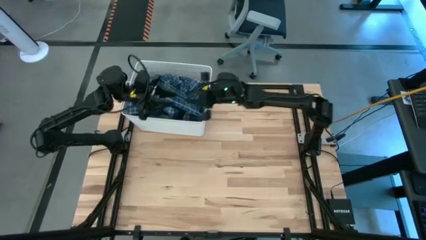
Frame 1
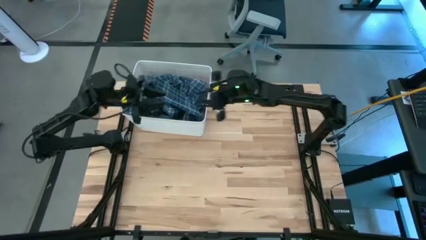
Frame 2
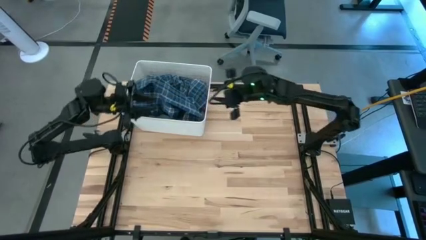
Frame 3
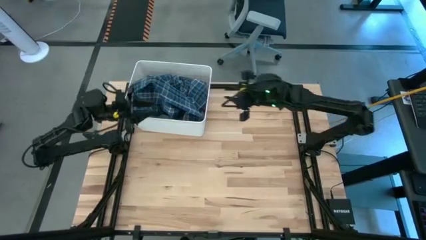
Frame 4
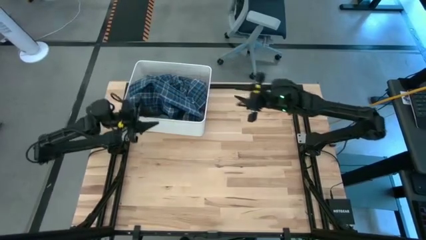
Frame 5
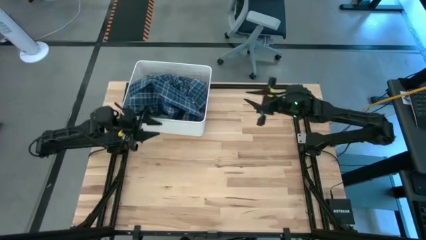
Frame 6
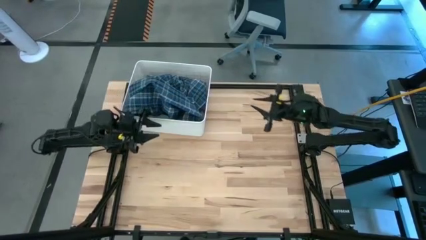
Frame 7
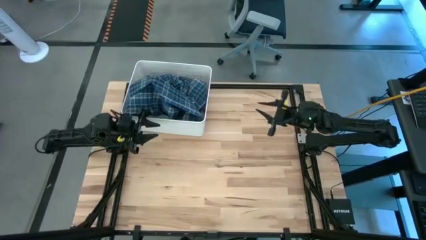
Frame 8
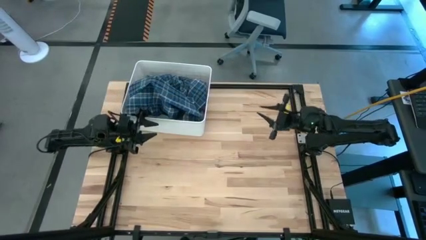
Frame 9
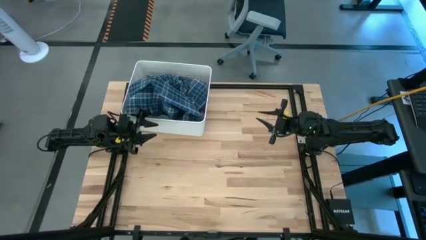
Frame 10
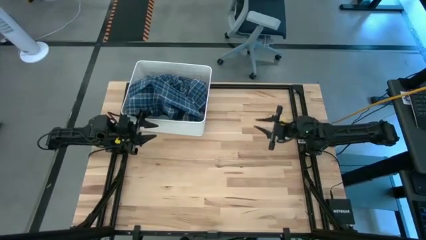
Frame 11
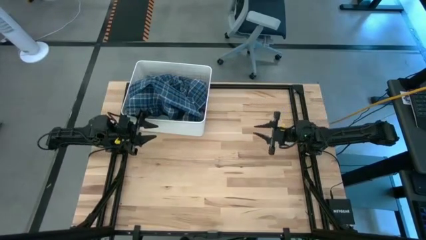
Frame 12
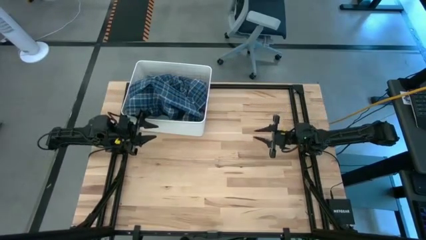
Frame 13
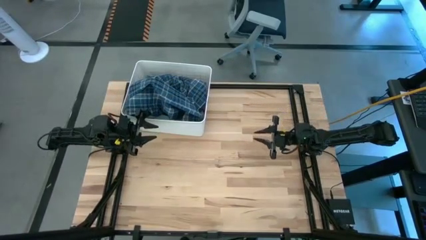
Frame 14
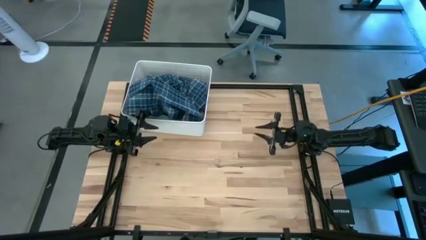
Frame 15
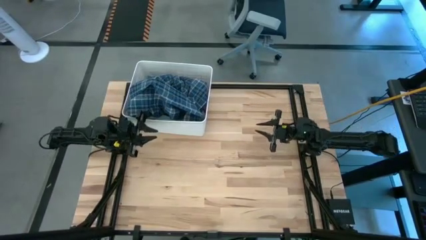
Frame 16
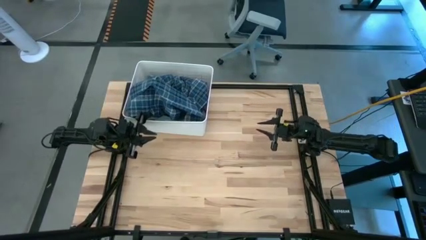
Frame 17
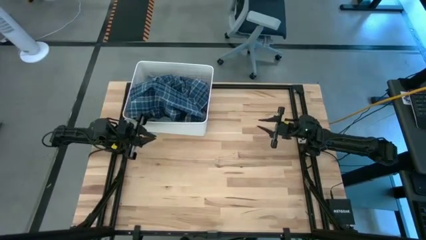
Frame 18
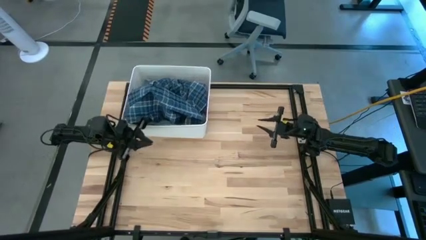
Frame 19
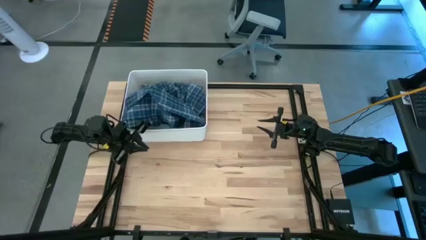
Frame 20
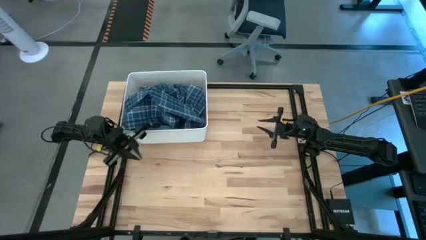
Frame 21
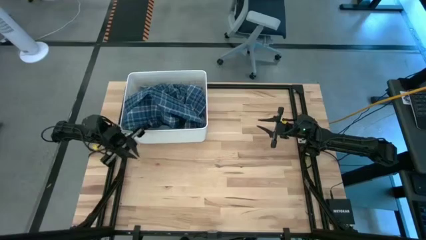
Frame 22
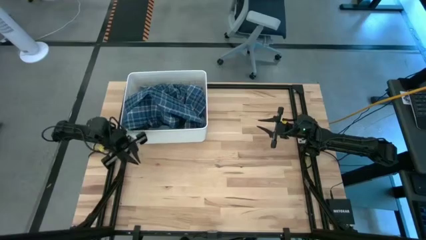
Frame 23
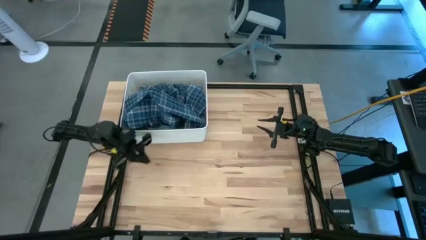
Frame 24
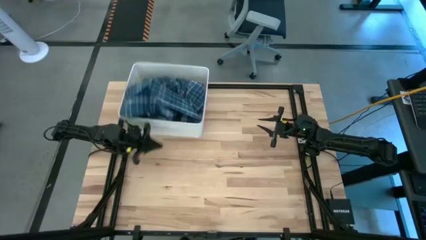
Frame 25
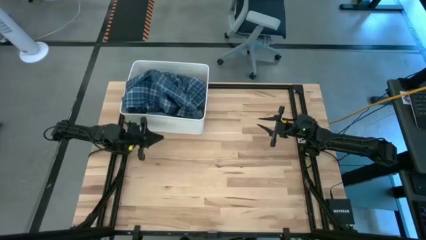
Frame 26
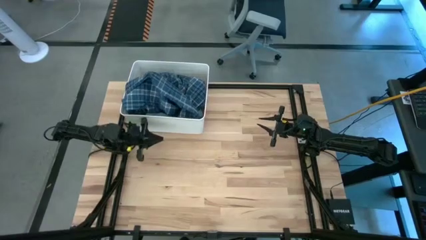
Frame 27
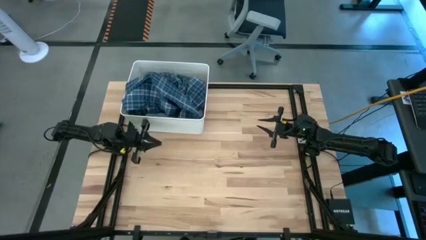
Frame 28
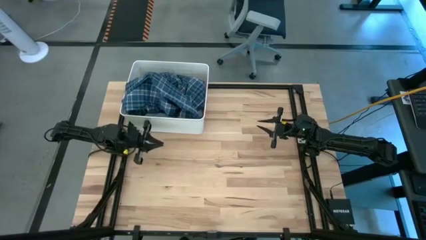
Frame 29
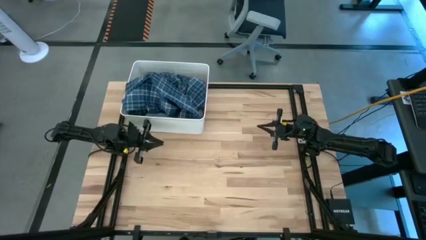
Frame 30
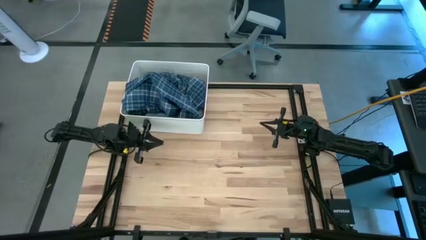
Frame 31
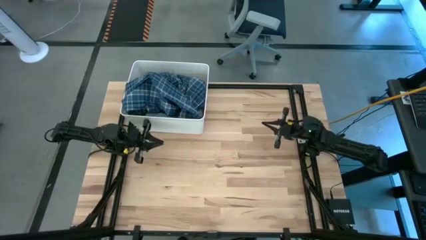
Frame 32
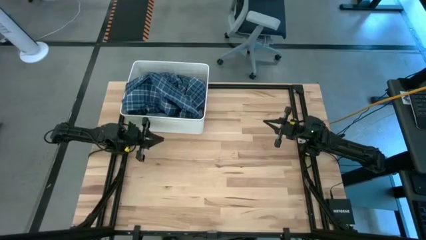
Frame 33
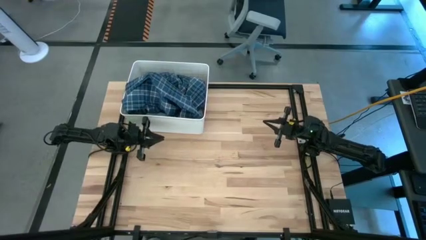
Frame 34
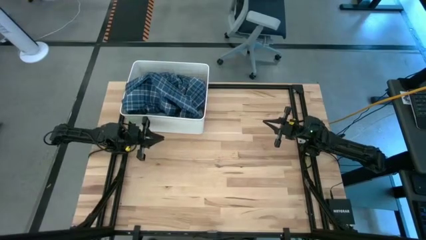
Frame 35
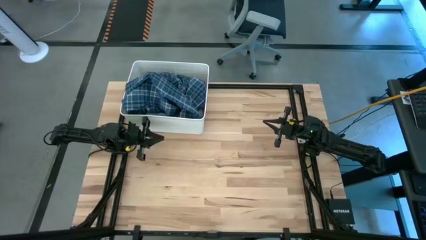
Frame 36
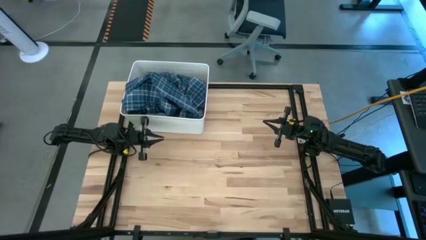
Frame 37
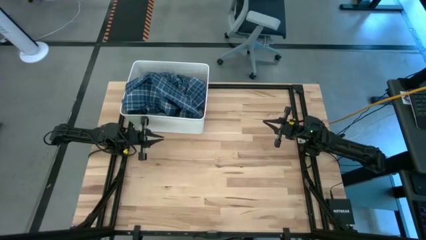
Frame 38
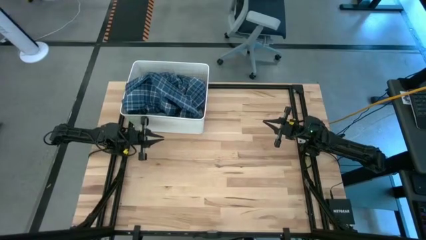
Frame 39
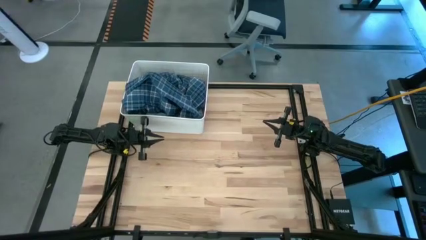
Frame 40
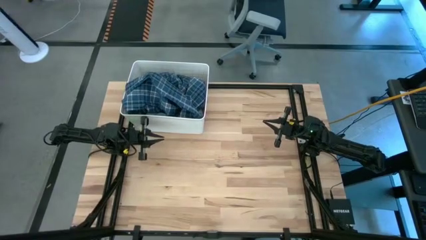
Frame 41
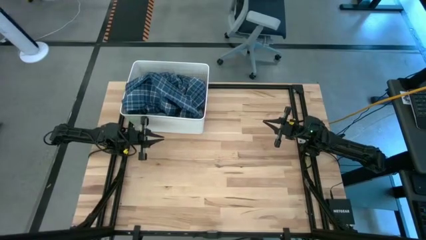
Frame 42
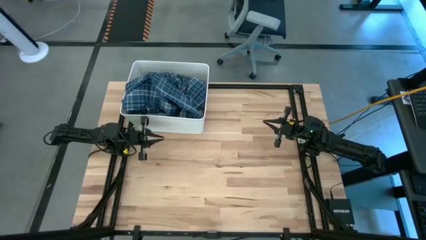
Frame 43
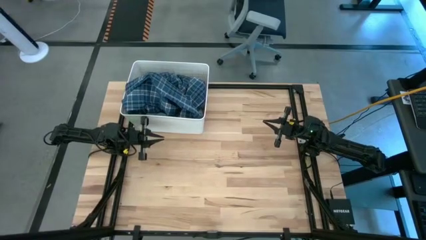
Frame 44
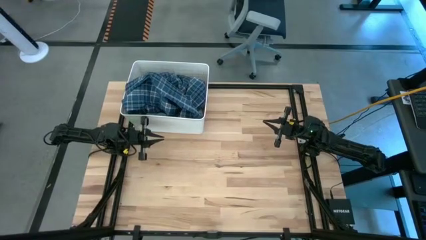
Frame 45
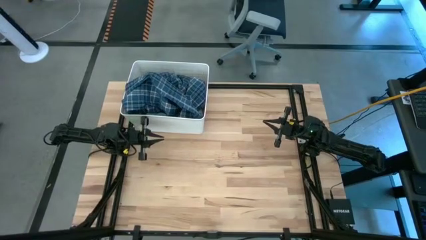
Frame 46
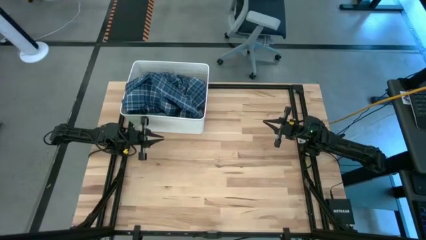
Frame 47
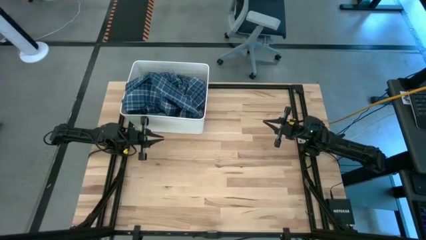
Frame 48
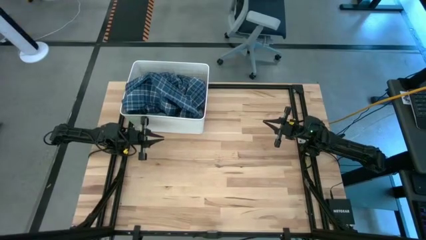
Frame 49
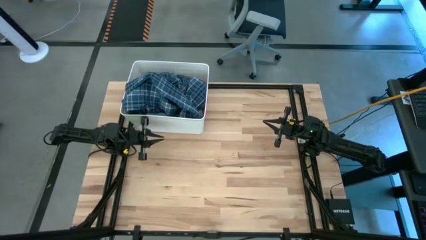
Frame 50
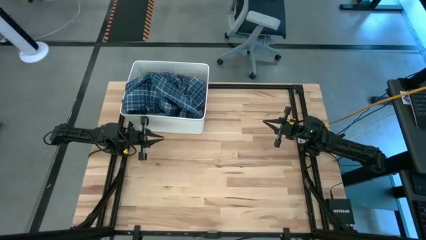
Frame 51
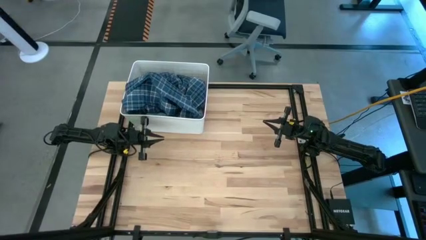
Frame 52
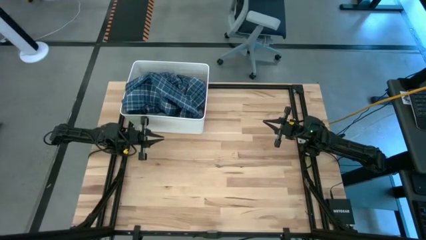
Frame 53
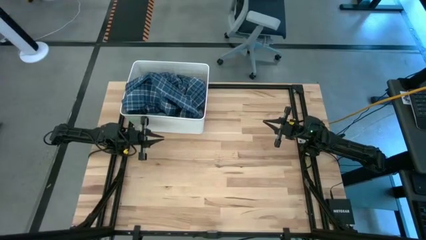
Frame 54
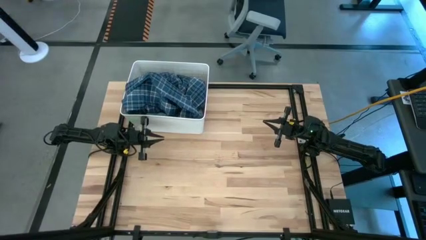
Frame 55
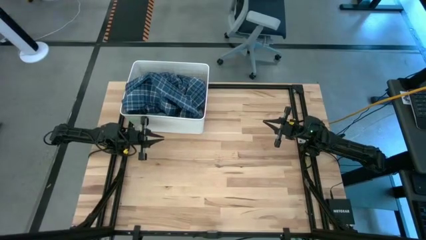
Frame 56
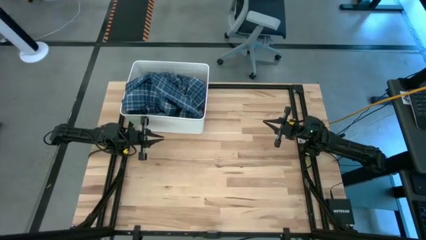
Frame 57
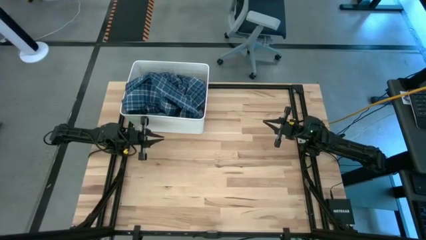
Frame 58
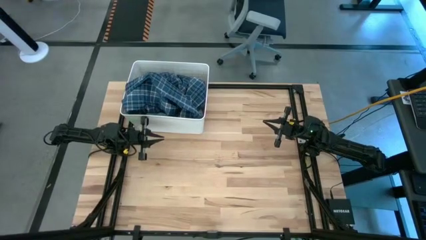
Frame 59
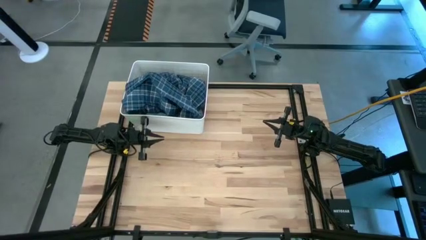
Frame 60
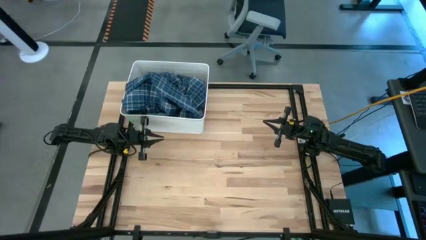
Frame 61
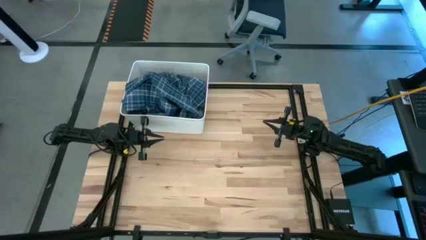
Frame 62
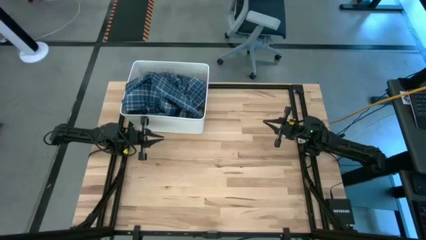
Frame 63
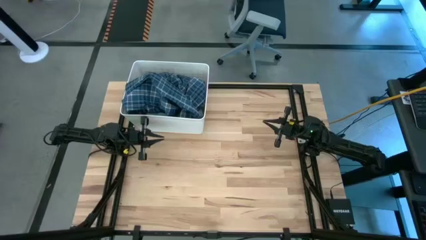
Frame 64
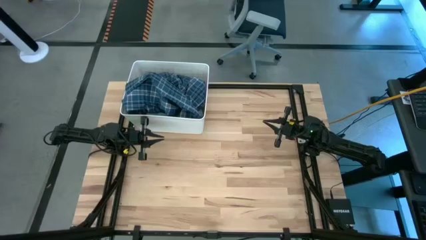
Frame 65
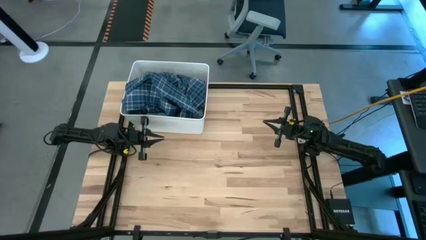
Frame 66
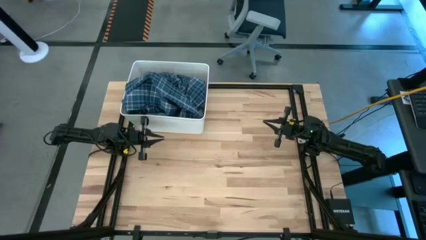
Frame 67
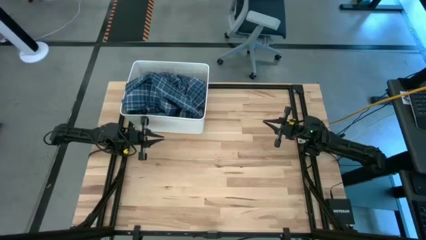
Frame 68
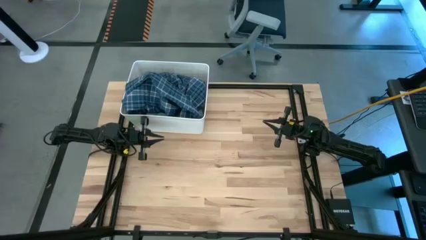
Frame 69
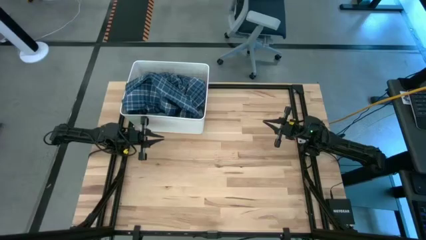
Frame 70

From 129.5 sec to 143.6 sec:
Task: Sort clothes
Return to Home Position

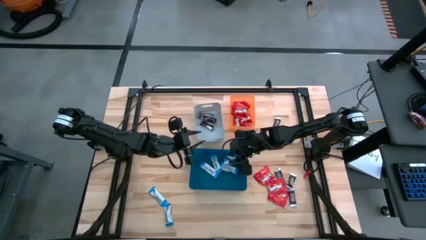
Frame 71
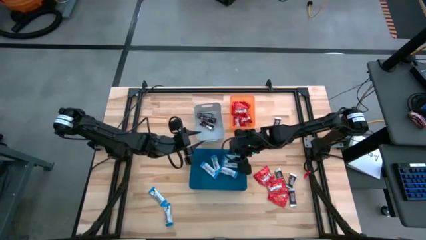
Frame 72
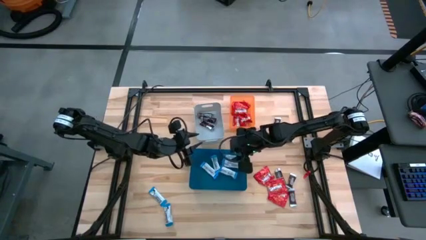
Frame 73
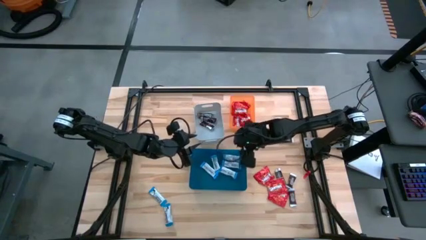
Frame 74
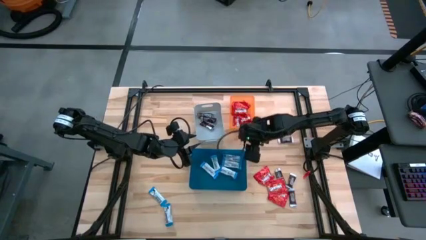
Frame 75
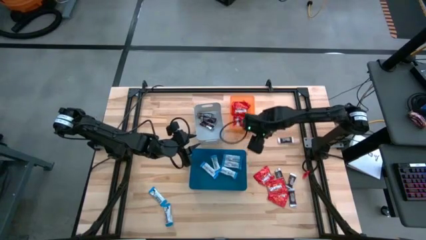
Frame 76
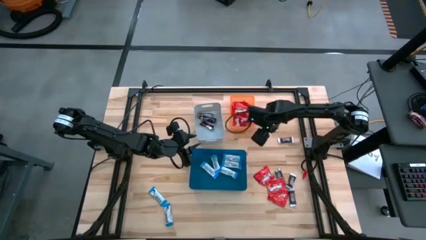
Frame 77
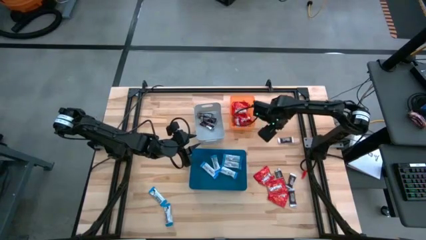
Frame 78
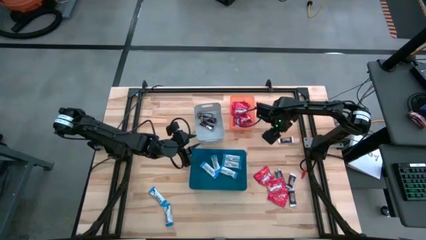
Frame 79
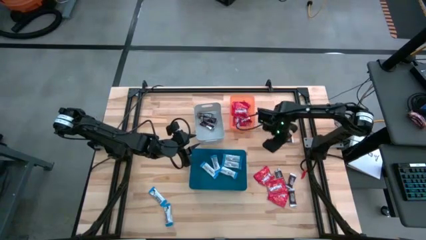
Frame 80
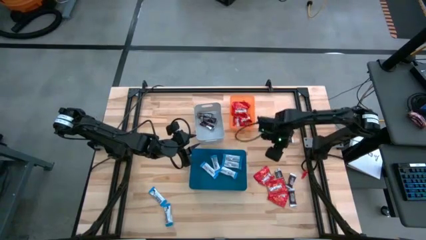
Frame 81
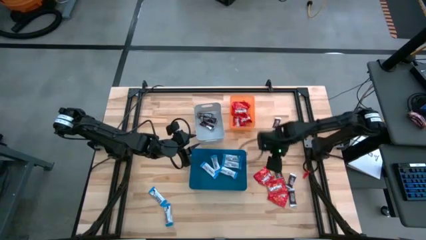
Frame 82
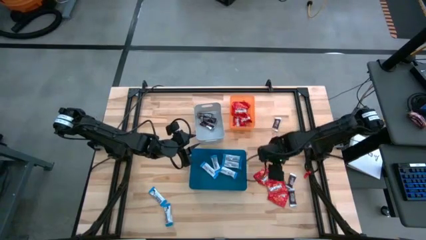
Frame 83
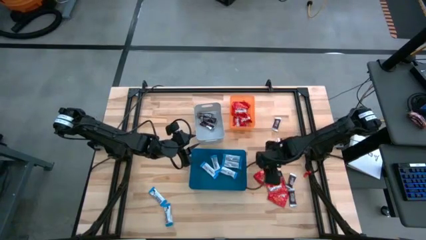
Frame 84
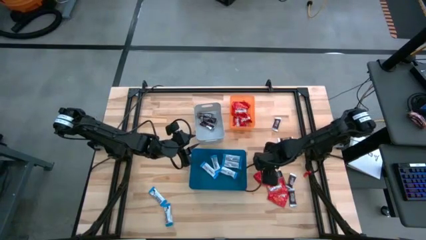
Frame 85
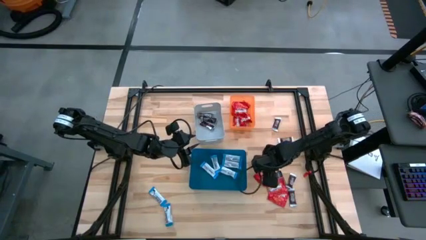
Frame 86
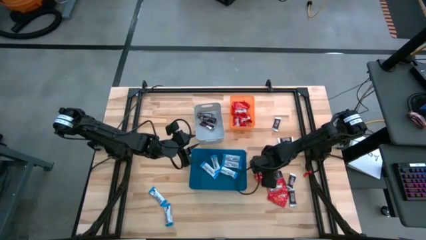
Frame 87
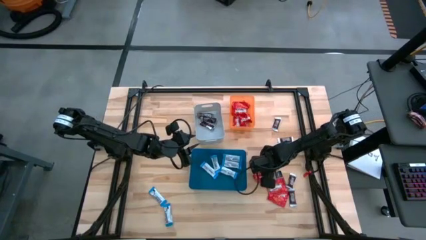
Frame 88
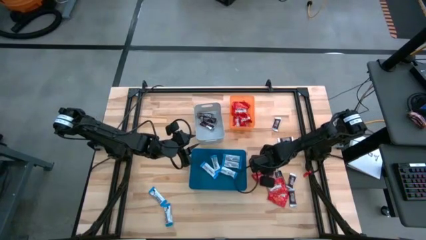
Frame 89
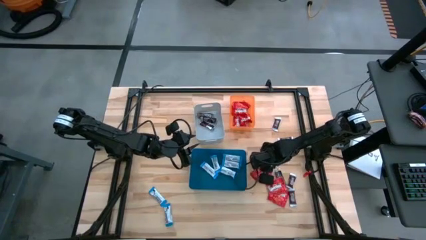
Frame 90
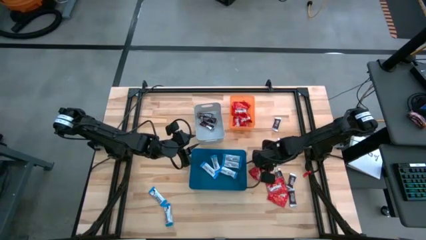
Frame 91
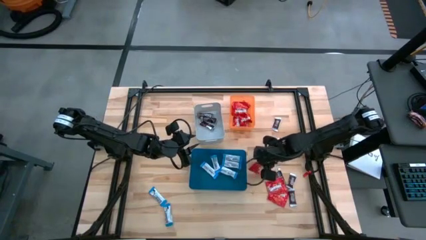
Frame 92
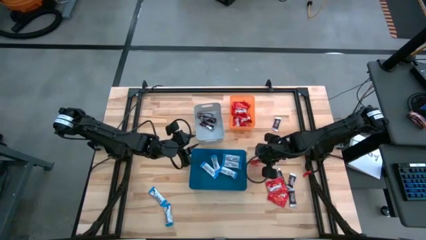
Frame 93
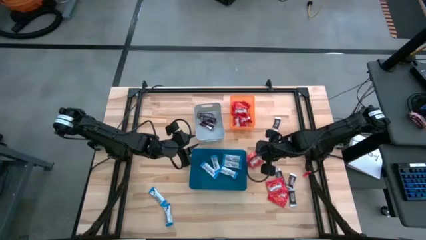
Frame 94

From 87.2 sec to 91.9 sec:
Task: Sort candy
Put the red chocolate into the orange bin
